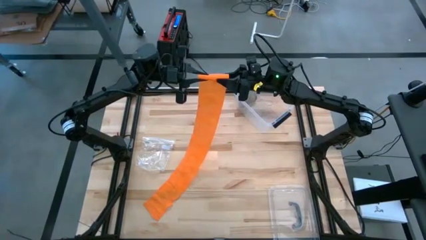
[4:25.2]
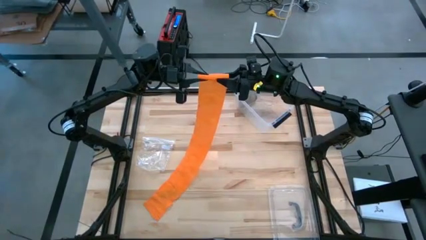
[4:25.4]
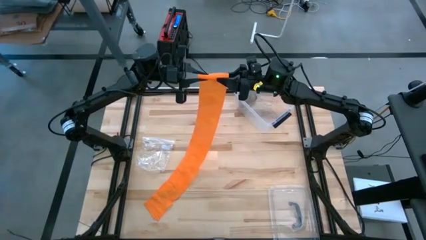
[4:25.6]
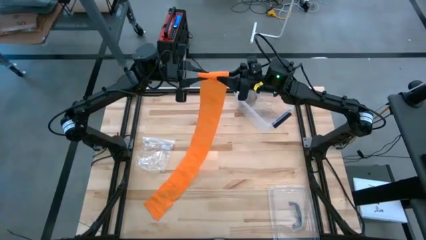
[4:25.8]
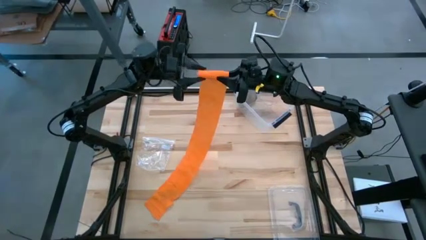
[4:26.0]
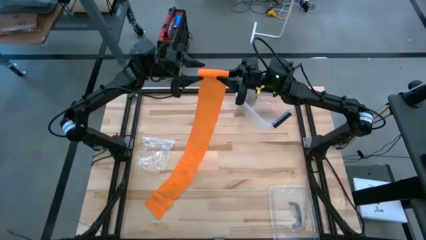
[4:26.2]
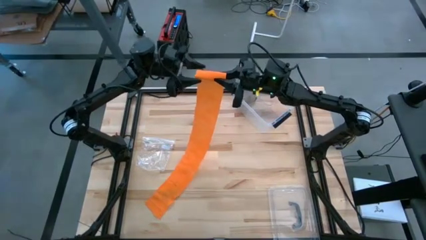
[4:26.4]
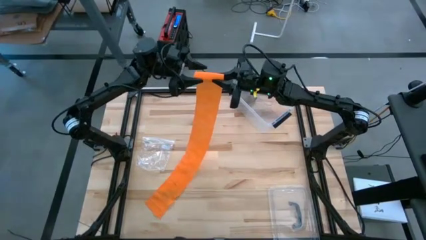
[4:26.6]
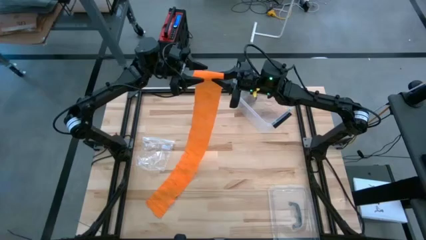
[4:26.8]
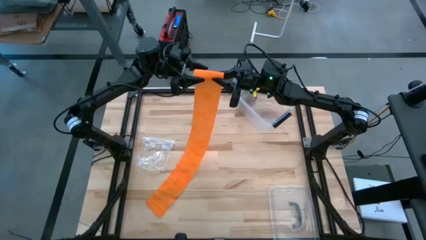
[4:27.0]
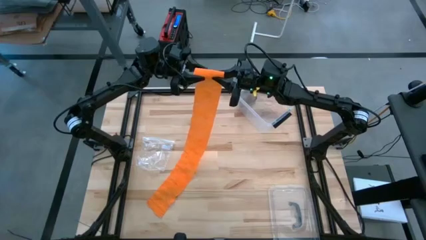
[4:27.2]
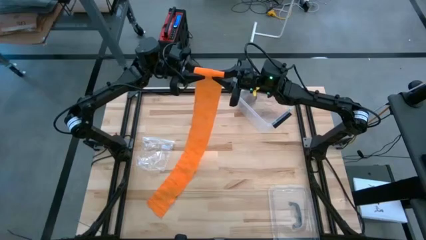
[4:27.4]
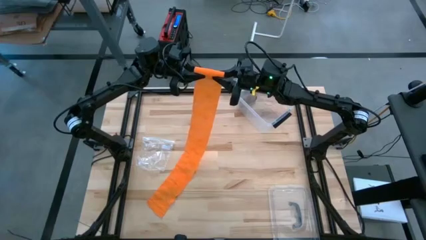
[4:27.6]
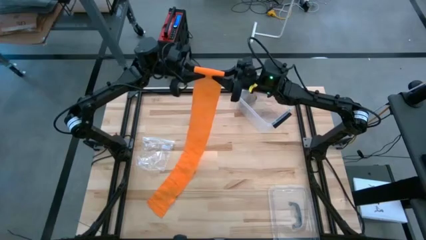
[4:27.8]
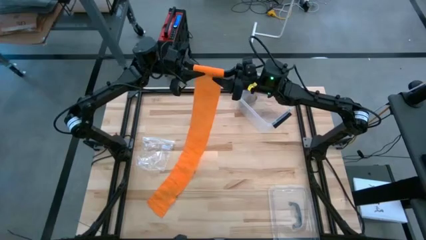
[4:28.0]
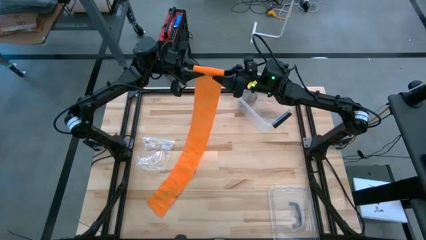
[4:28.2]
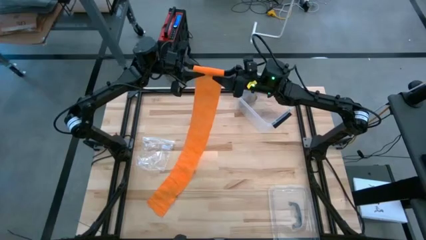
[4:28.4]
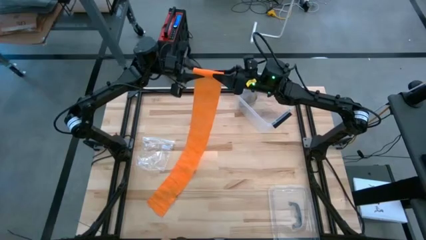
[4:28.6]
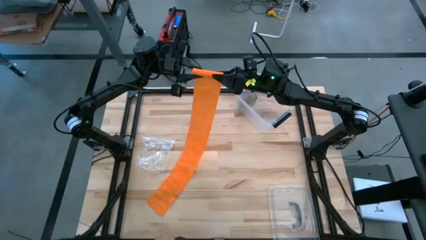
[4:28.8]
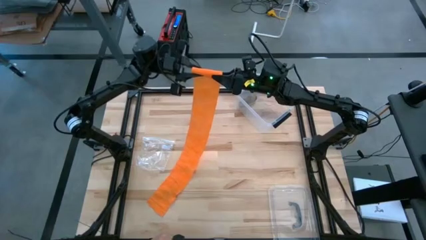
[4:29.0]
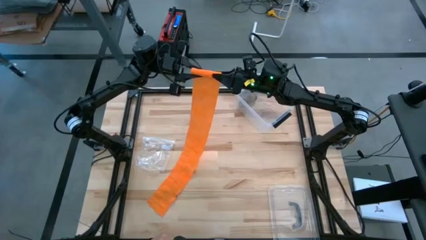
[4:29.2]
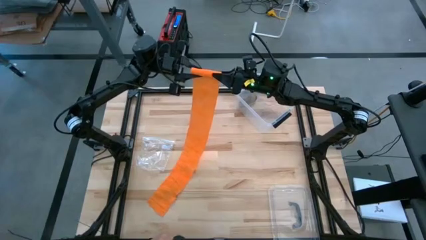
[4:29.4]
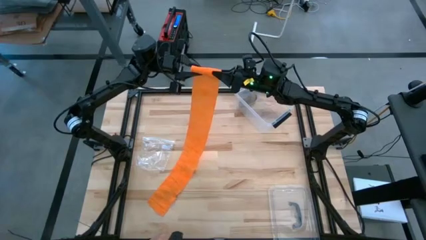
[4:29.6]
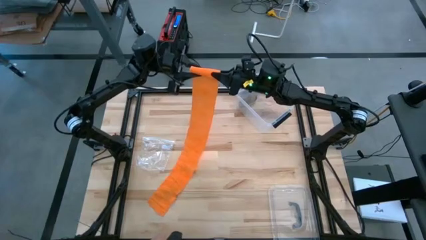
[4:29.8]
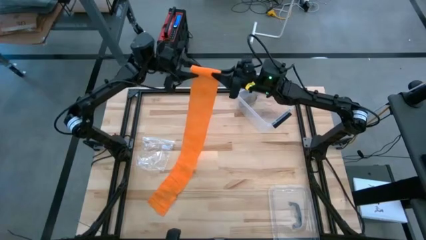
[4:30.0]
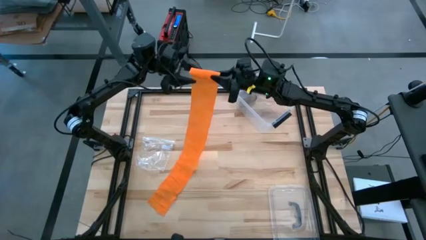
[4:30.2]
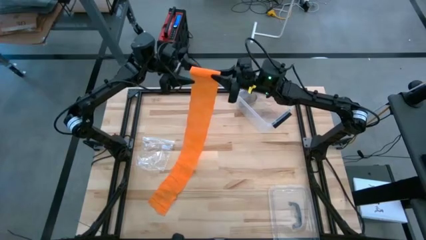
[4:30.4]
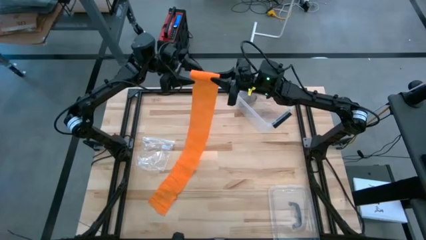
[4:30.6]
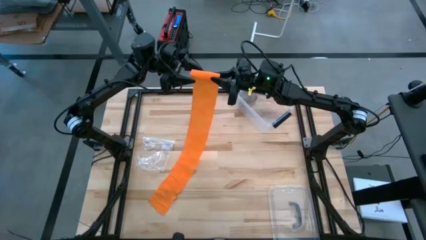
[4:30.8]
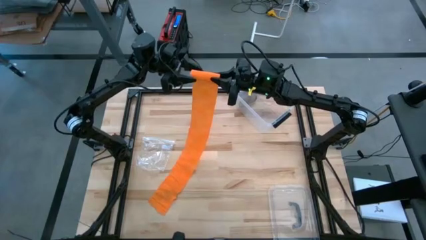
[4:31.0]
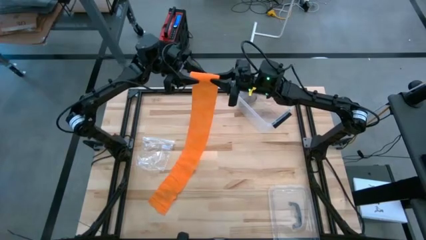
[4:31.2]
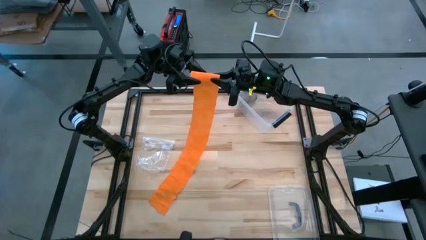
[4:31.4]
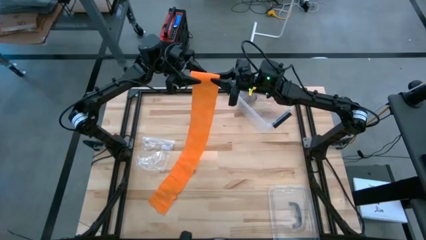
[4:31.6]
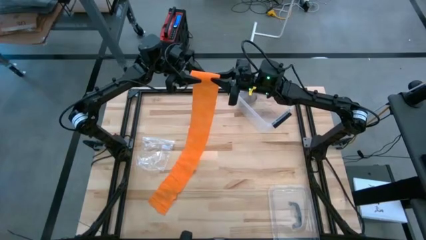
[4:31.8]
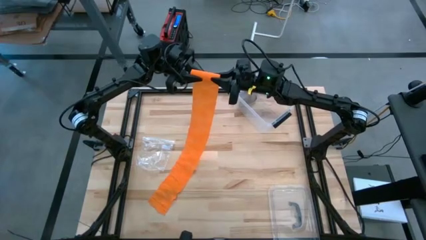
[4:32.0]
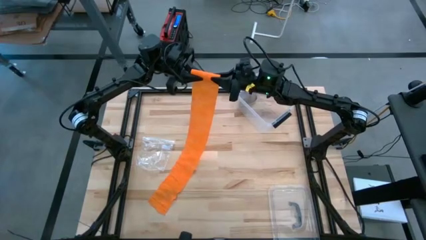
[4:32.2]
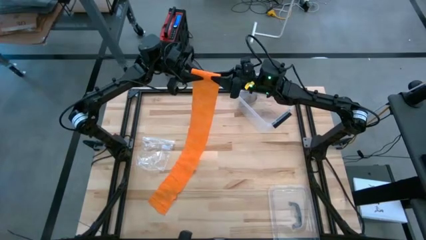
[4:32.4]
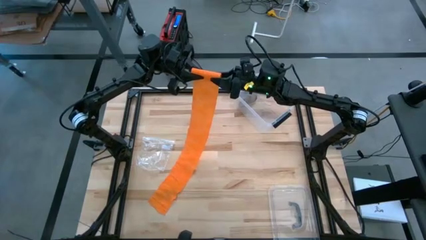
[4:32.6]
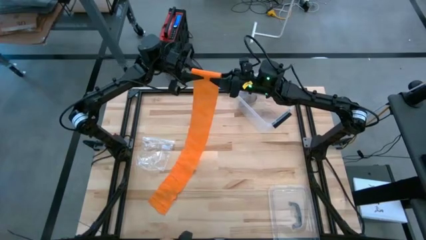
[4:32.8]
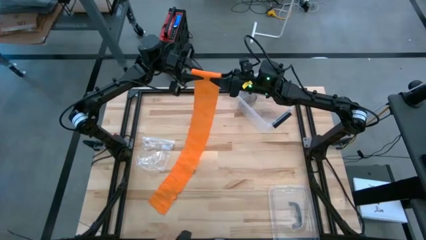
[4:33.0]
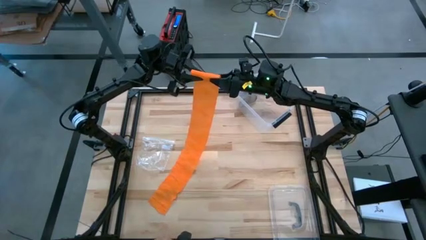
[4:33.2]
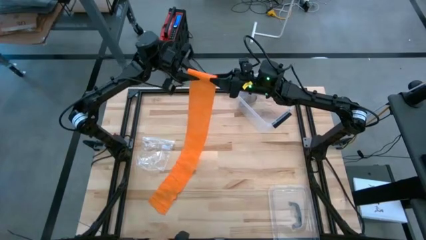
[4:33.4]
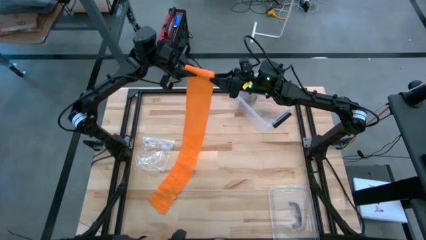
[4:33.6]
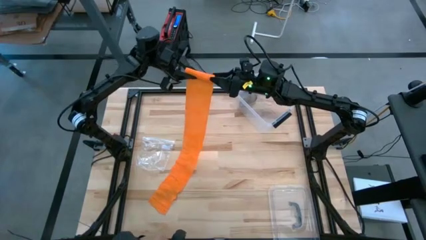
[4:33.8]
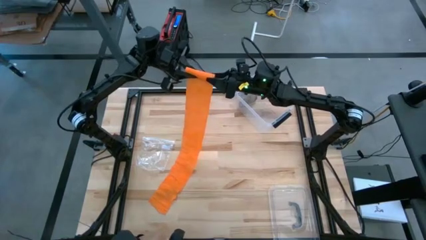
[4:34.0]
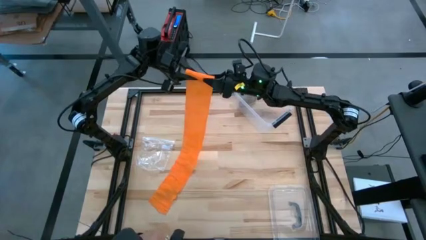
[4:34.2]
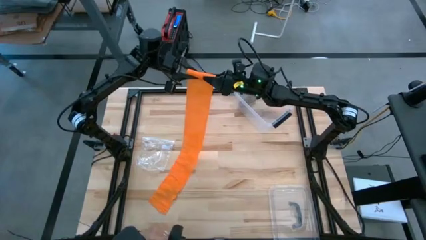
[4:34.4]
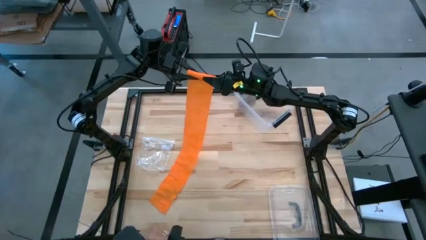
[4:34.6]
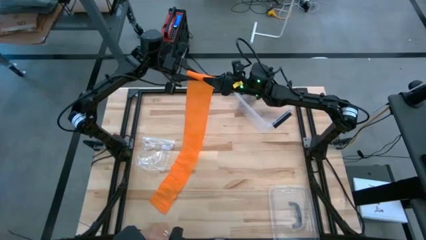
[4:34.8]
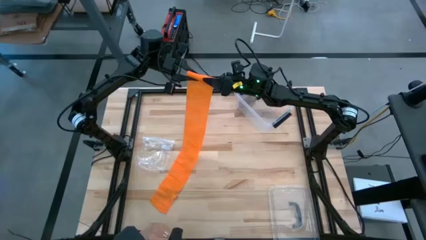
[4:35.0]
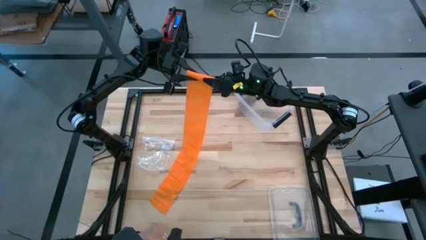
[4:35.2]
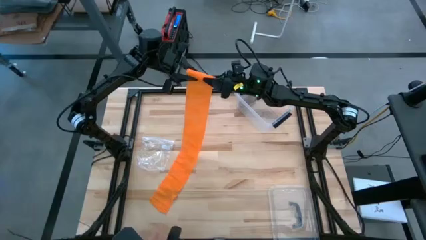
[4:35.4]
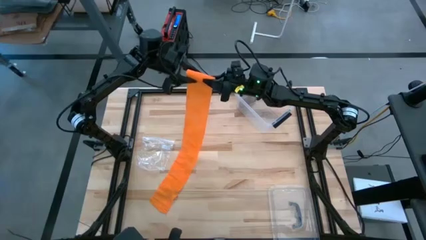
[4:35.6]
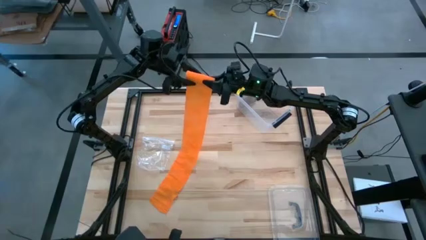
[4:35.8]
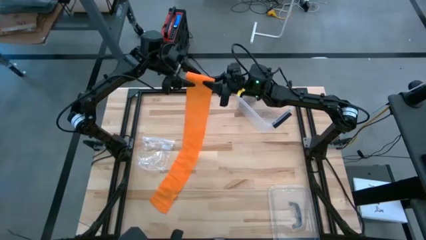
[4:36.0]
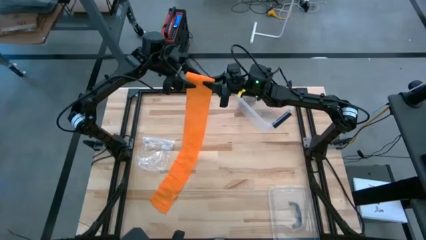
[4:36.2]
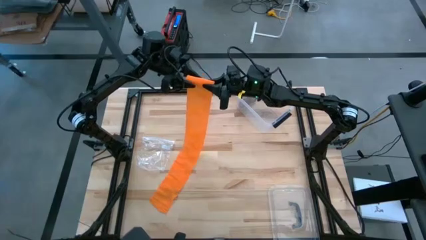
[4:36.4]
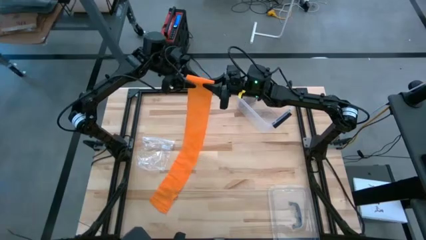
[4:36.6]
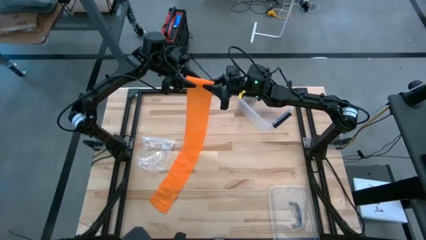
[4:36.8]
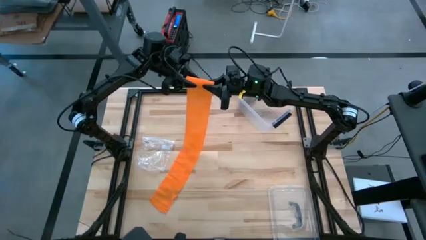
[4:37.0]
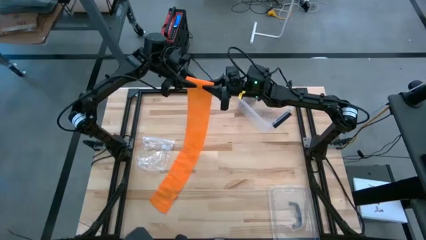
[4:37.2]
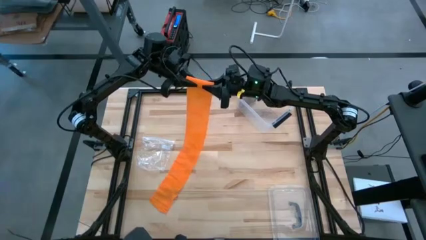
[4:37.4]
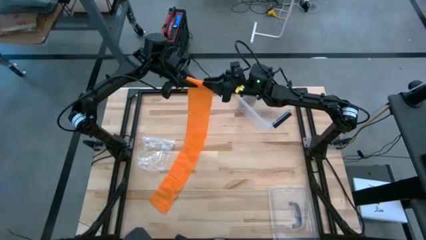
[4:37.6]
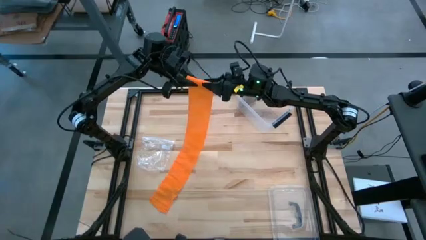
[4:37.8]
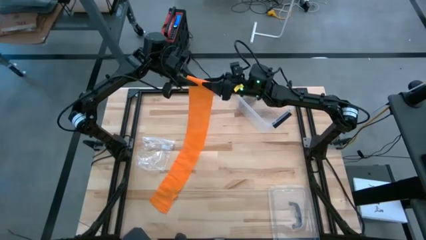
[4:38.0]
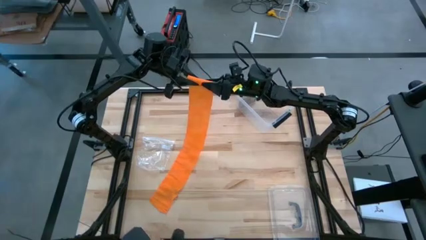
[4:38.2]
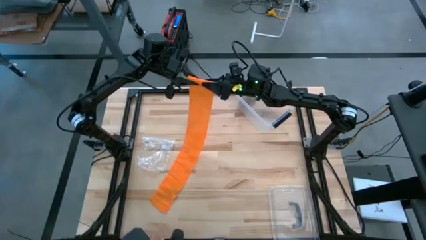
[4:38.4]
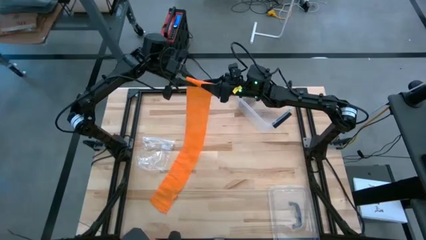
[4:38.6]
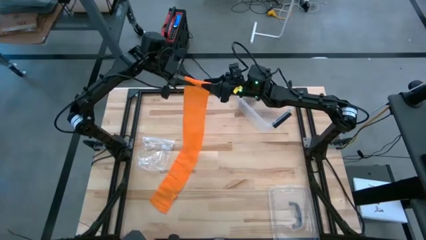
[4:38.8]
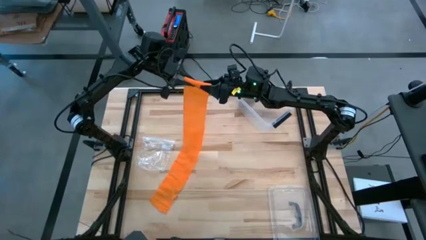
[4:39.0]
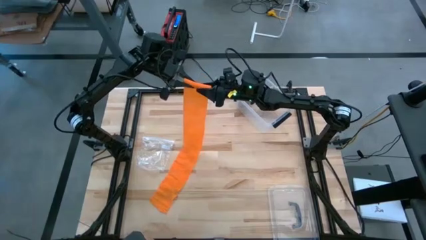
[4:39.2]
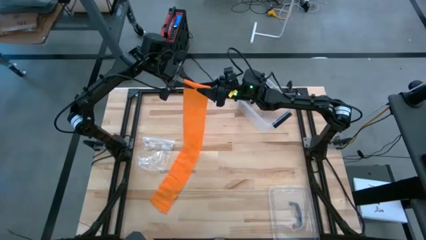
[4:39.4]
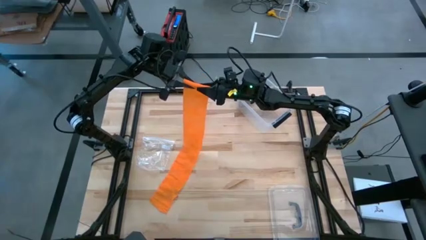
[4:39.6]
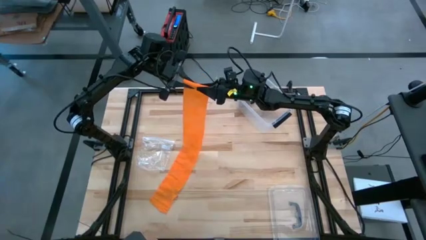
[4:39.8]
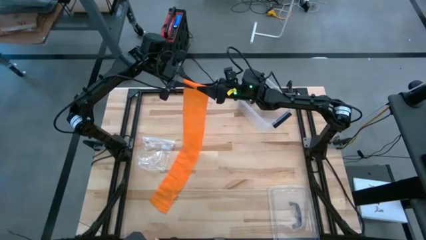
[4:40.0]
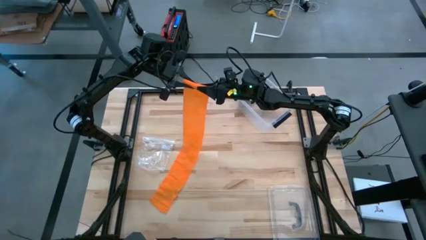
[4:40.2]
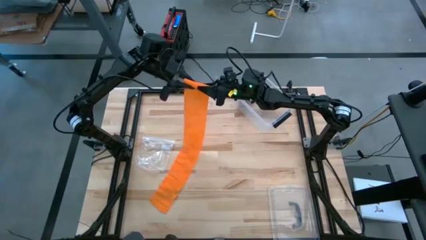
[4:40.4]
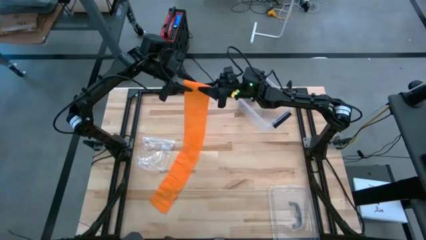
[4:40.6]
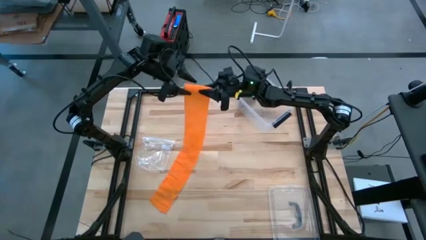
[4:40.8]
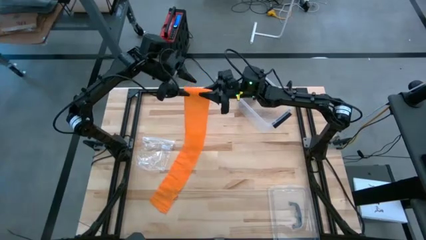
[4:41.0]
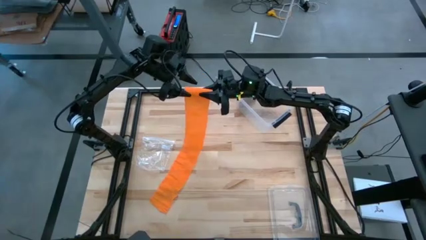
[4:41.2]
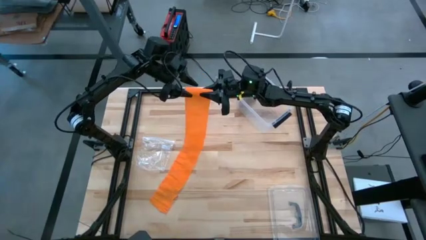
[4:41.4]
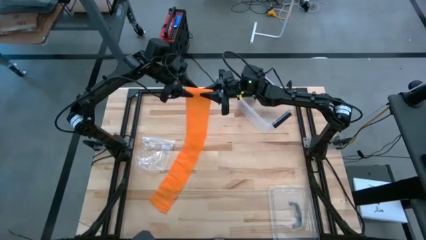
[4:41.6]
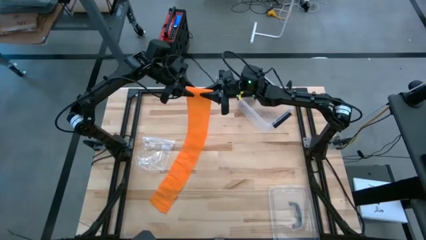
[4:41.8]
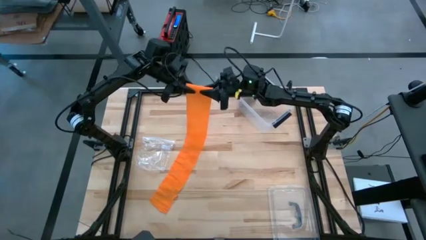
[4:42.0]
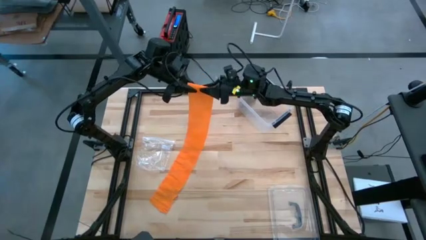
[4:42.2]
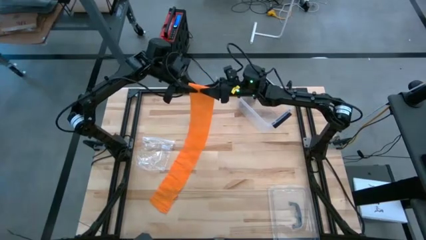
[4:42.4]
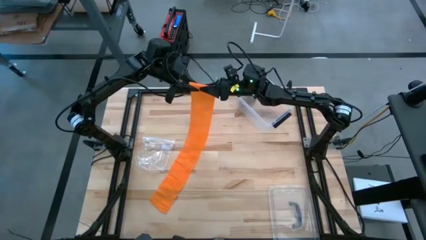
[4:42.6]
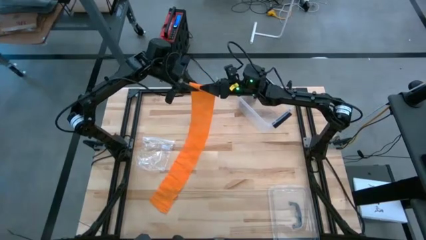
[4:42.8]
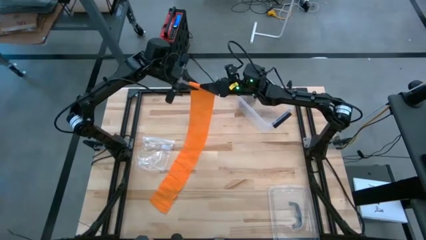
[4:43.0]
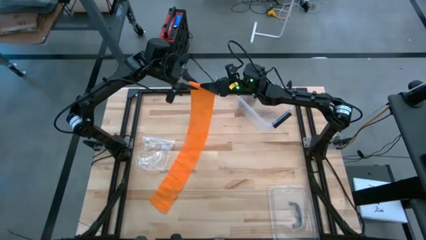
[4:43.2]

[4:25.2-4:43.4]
Task: Roll bandage
Roll the orange bandage on the table
